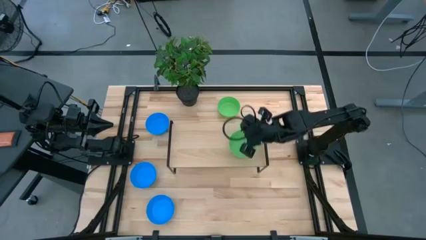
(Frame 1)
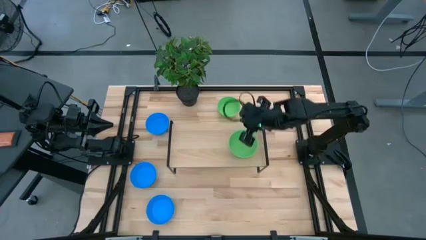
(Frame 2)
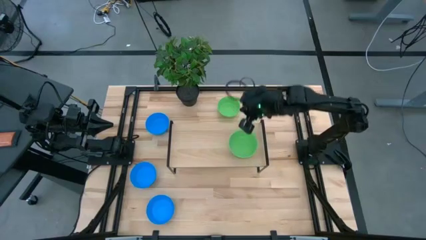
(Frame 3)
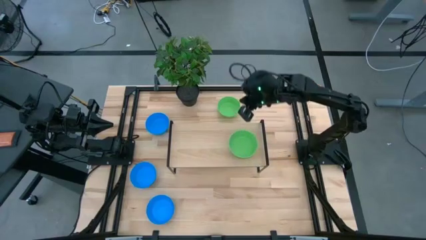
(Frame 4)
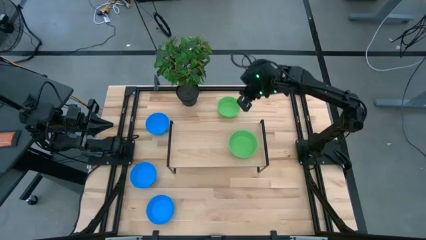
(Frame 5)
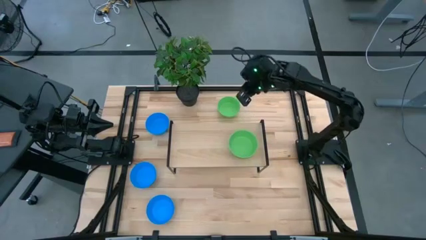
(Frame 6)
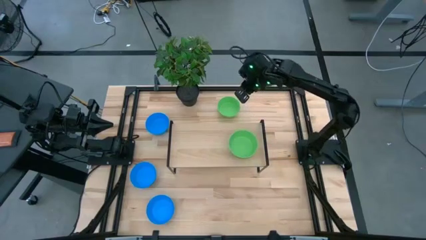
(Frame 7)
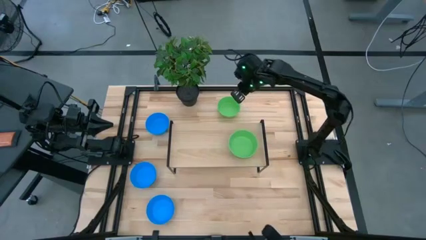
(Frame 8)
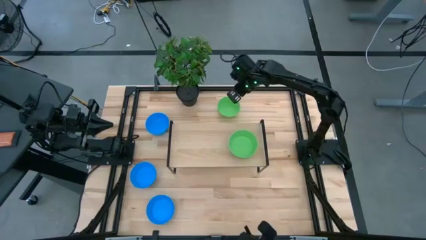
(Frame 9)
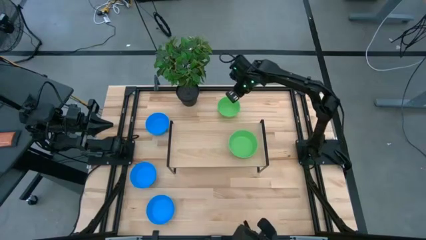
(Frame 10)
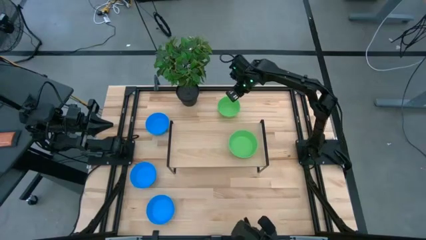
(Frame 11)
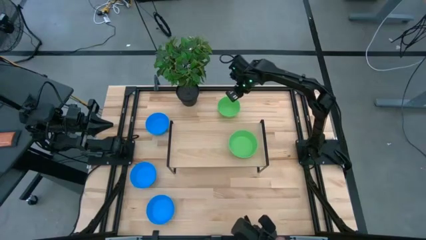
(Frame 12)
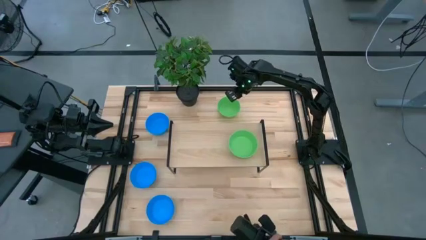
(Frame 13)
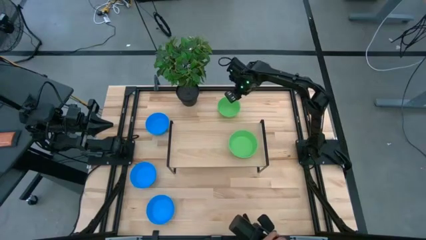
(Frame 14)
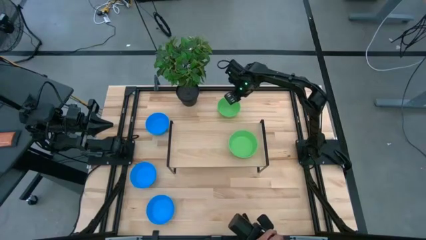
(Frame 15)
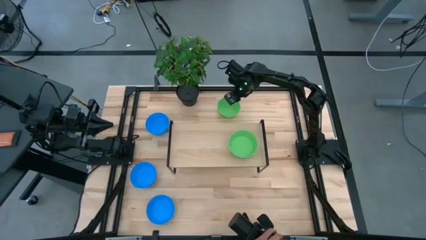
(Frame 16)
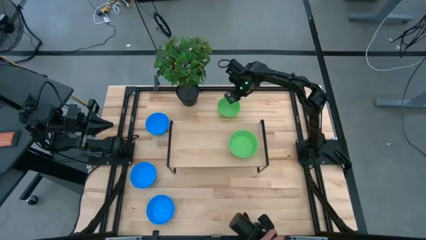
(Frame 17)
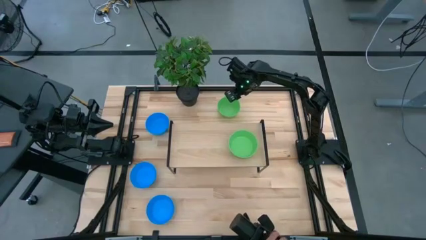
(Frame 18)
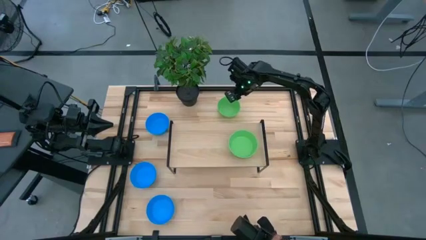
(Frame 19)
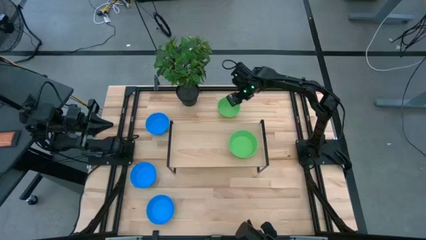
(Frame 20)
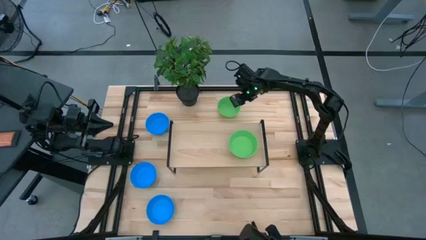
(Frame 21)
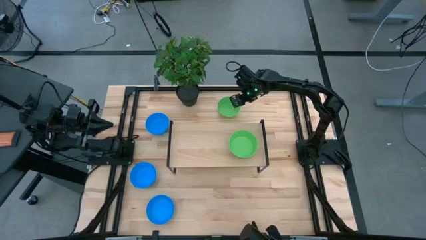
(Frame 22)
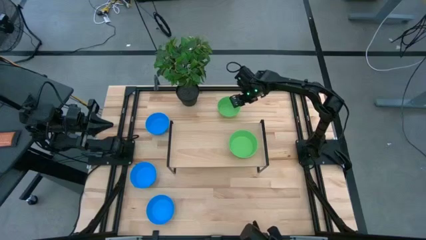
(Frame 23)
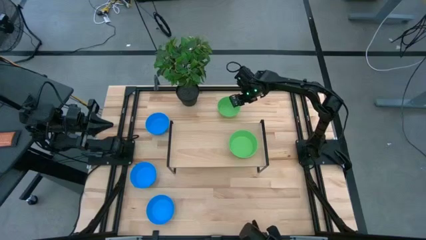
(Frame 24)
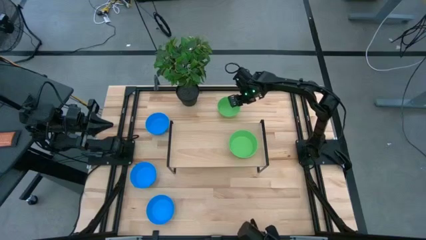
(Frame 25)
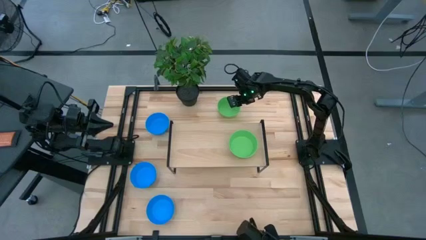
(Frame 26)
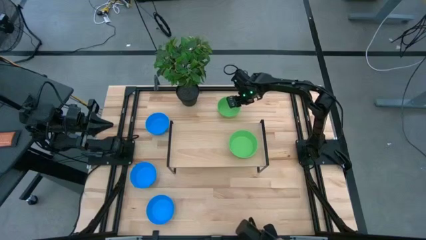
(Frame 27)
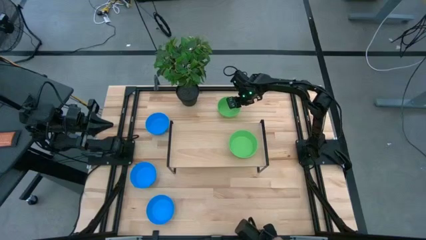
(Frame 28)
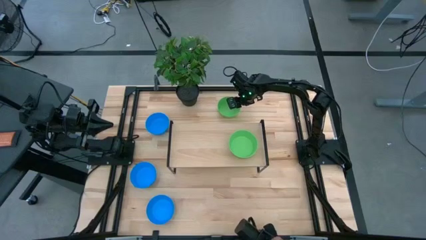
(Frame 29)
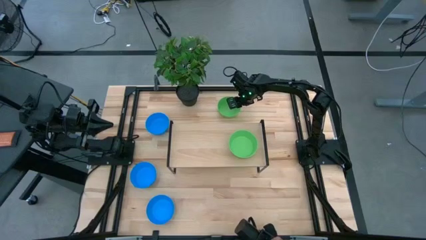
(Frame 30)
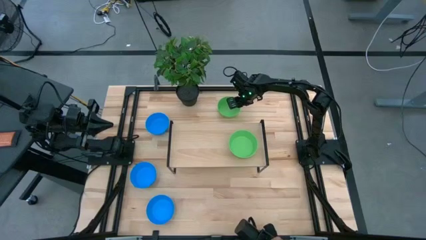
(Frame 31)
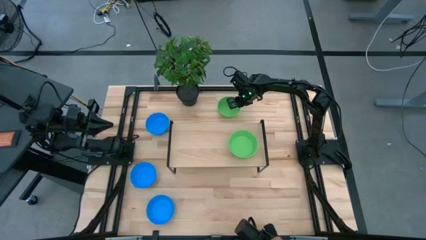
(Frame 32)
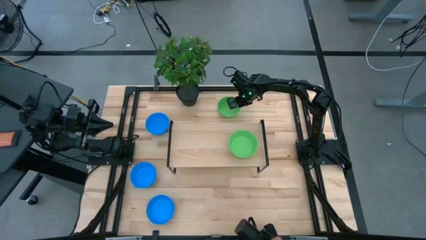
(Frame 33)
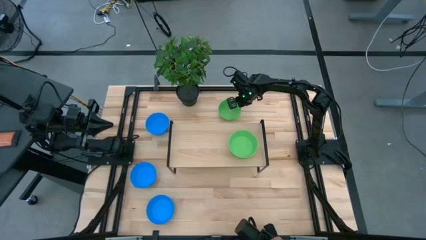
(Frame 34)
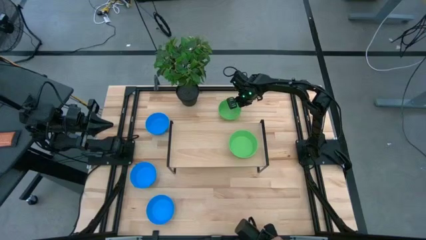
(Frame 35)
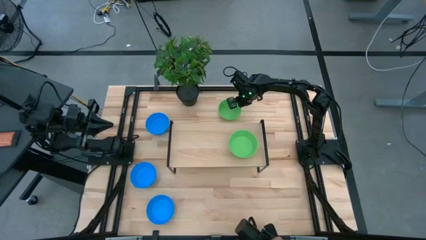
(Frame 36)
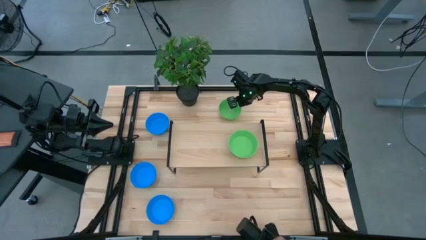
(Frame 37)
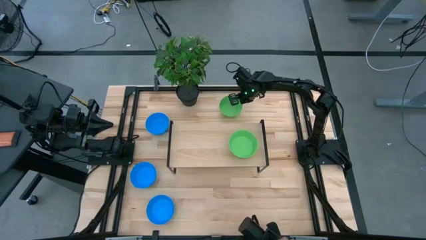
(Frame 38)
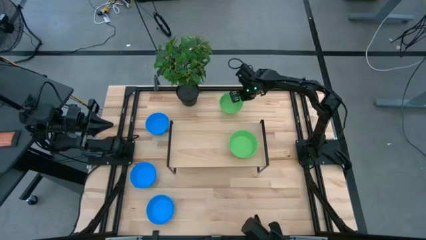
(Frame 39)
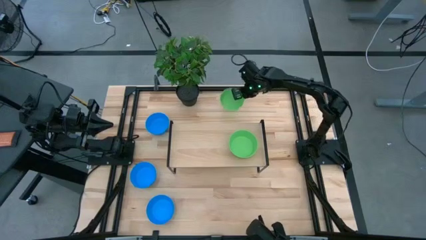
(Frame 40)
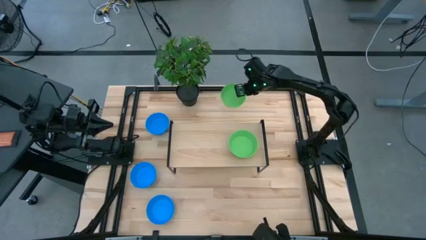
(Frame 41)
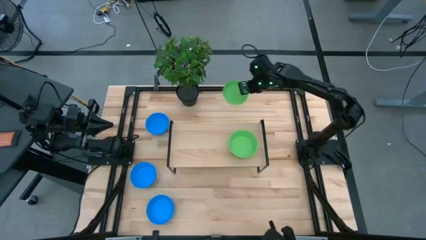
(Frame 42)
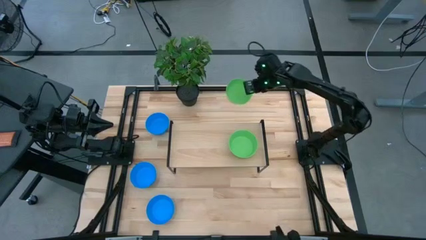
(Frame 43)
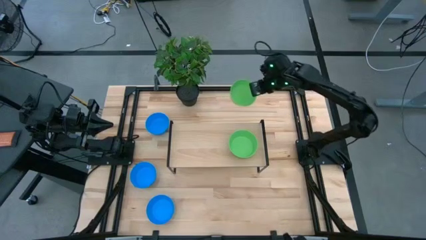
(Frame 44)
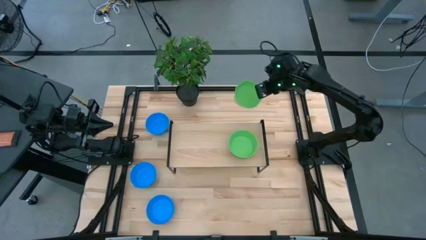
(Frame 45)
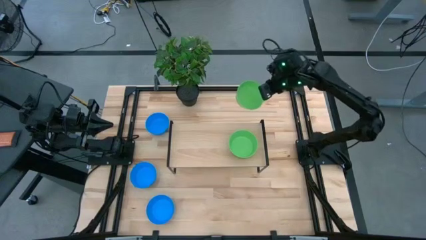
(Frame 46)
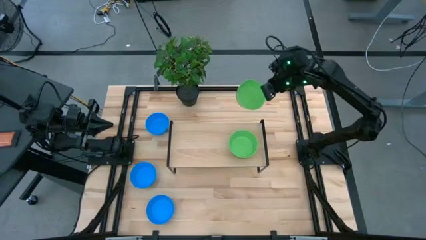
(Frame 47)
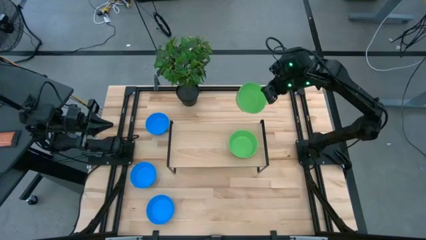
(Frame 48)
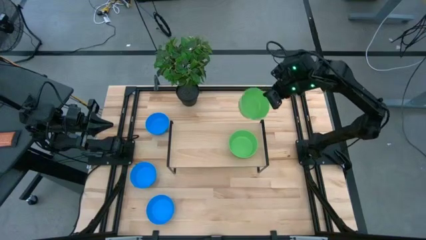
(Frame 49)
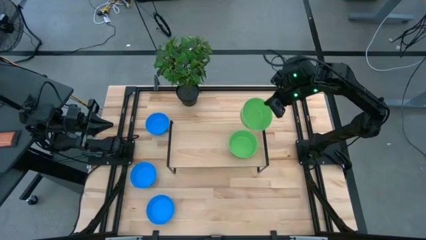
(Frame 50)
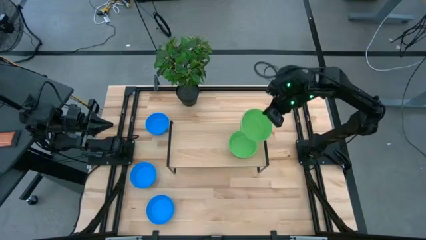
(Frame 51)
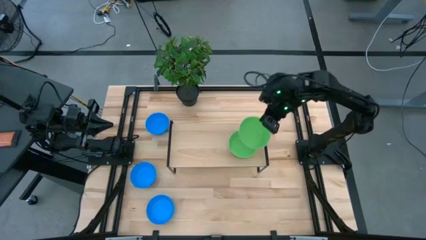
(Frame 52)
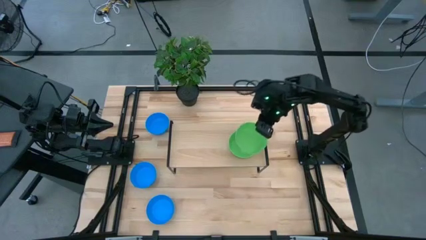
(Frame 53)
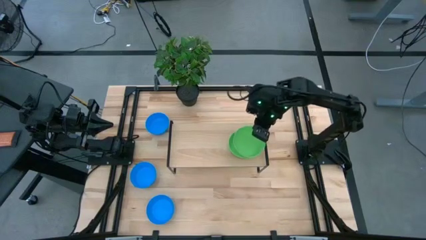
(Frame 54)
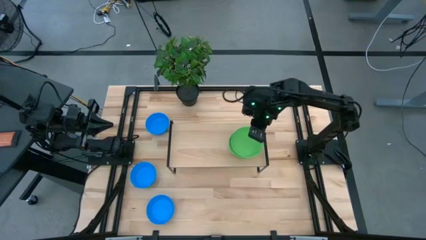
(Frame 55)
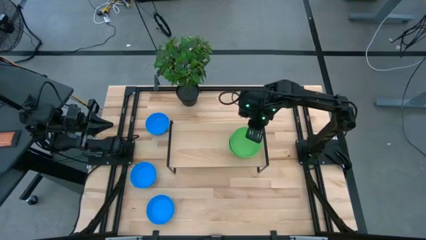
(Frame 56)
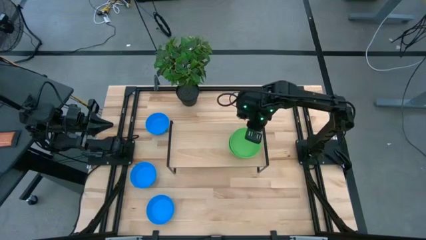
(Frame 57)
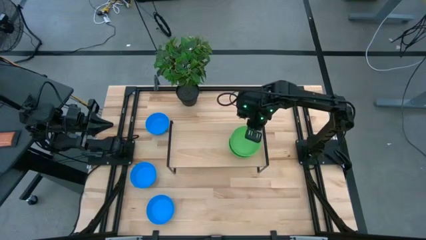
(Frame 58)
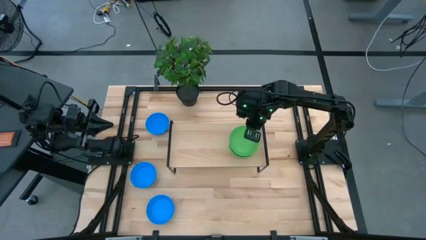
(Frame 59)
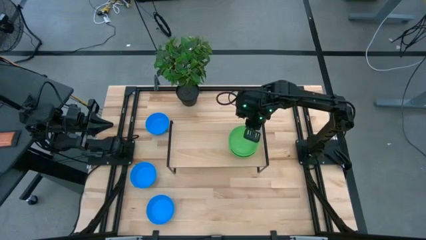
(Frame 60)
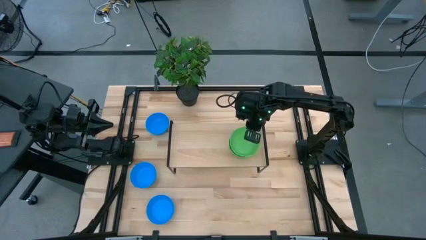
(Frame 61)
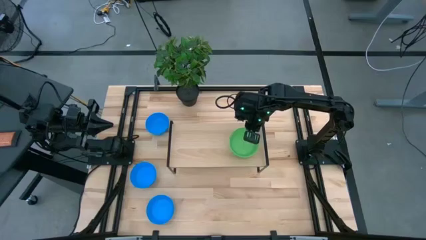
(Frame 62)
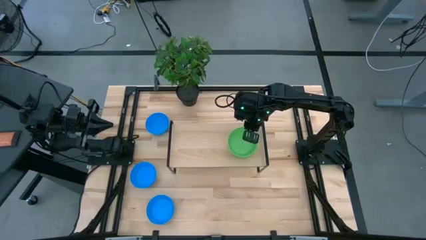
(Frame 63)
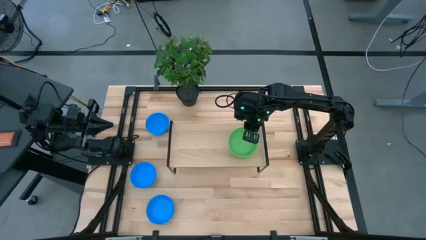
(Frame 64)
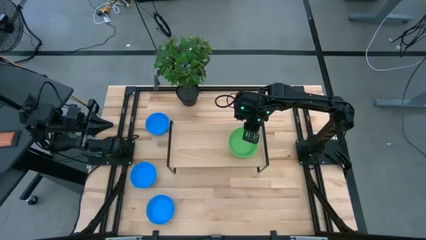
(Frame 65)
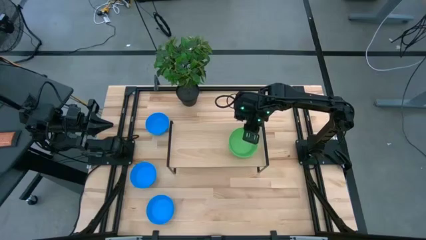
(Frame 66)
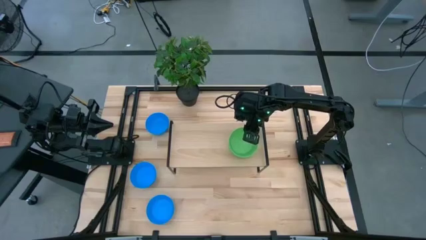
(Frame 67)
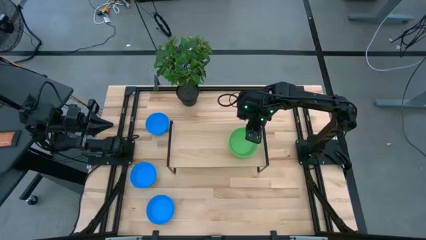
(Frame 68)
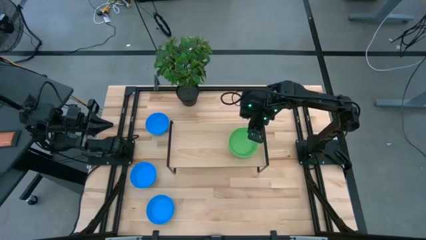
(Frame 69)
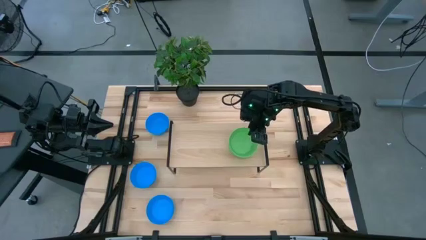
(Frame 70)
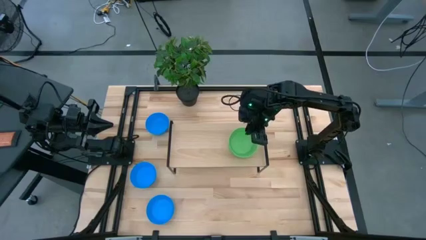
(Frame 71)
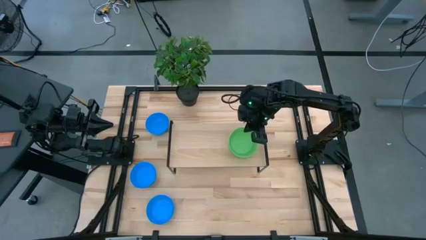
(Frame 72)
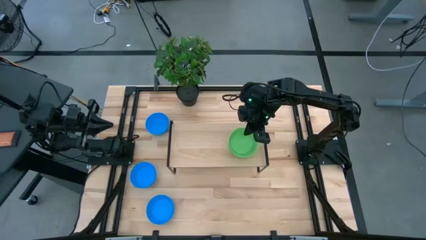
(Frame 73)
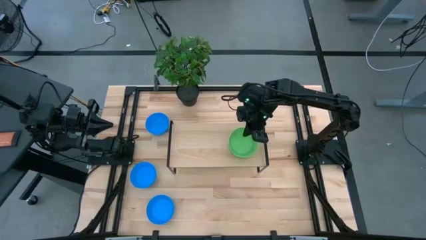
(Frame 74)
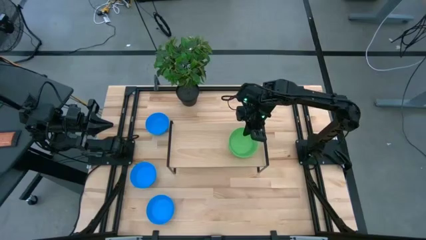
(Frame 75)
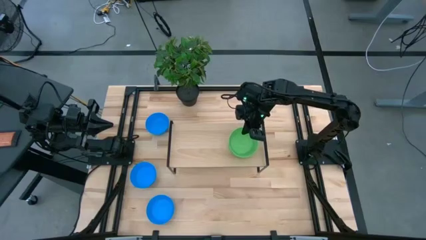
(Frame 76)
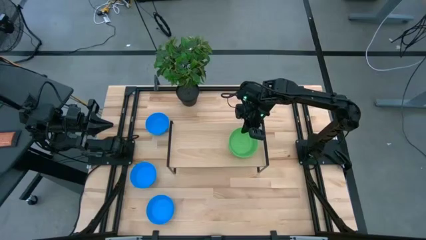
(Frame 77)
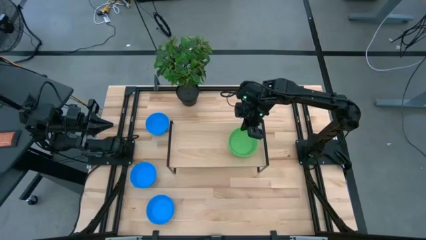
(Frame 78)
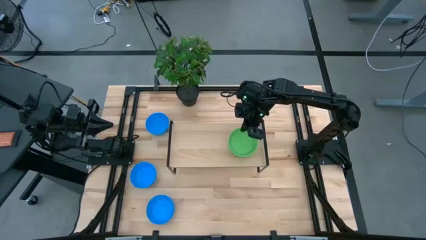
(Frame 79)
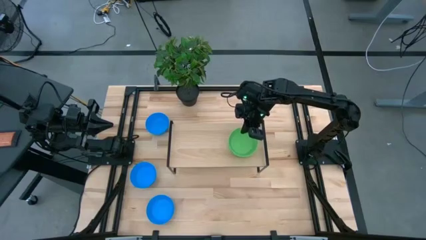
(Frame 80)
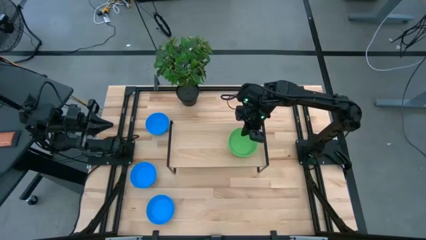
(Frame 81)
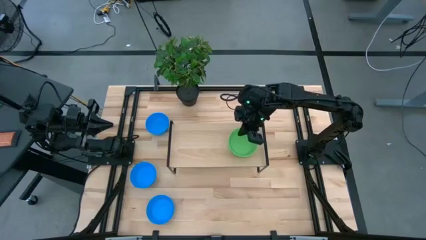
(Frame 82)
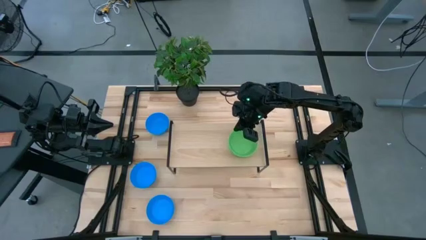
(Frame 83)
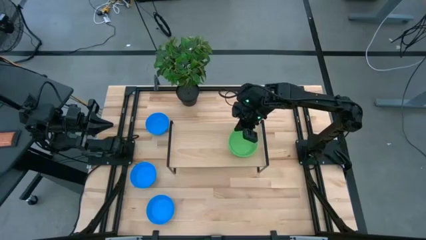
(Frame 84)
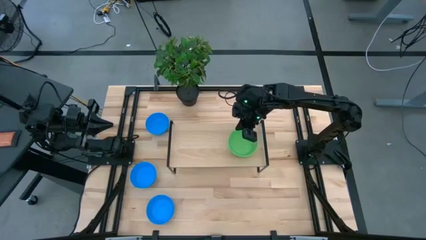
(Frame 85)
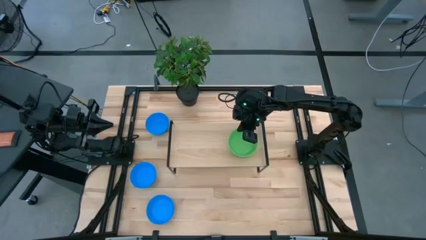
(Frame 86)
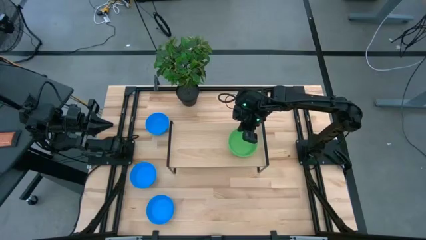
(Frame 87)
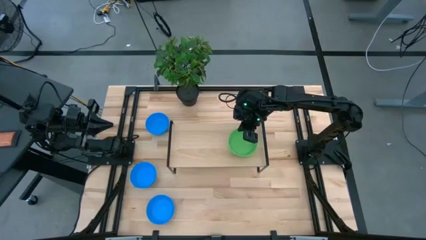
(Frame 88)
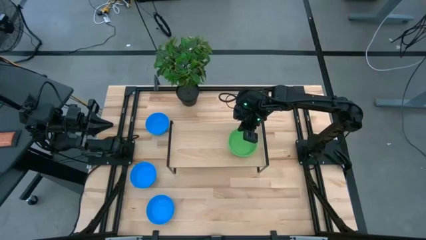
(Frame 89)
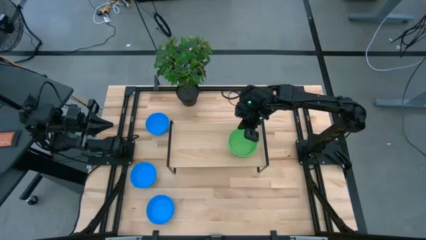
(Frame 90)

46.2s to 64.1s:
Task: Pick & Place Mini bowls
Stack the green bowl on the green bowls on the shelf
